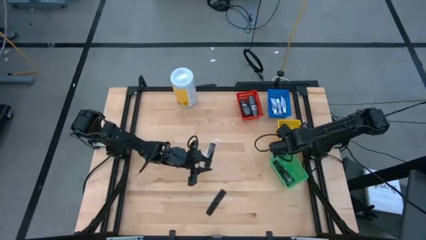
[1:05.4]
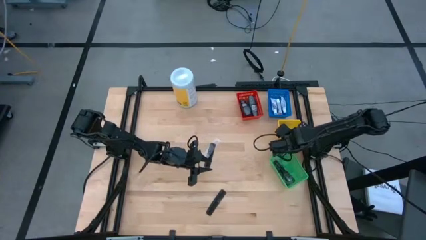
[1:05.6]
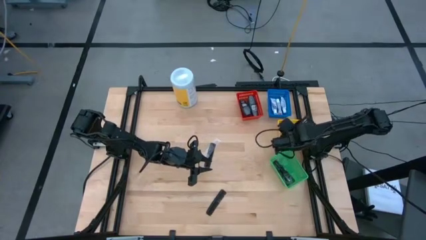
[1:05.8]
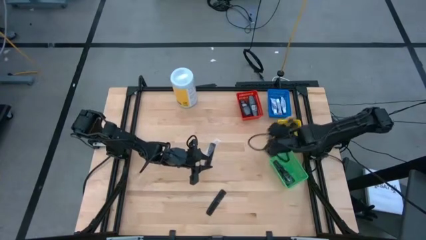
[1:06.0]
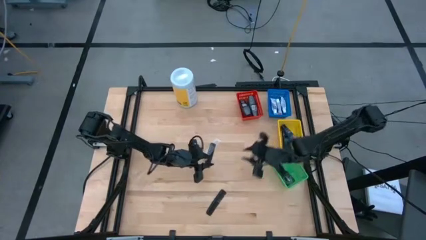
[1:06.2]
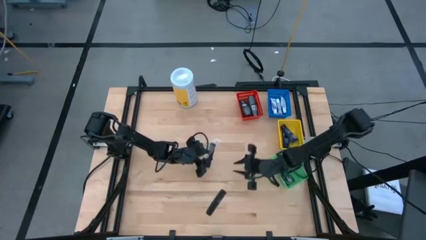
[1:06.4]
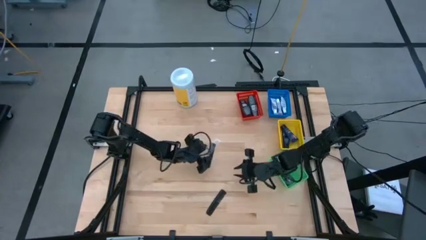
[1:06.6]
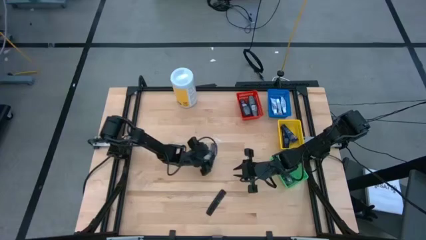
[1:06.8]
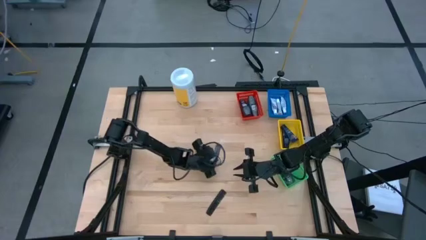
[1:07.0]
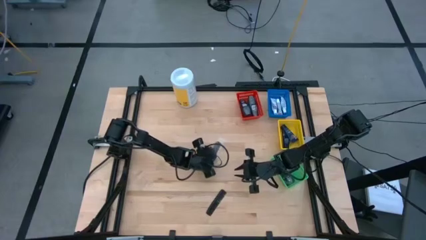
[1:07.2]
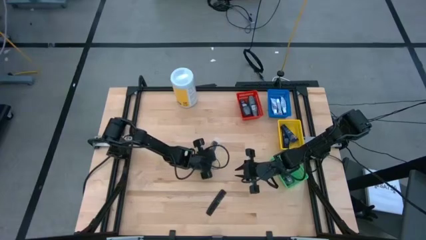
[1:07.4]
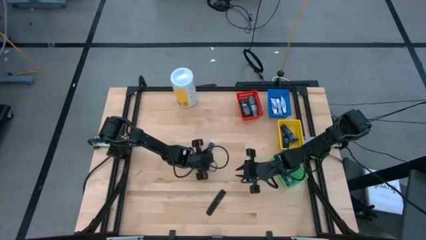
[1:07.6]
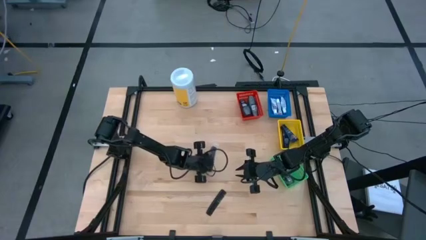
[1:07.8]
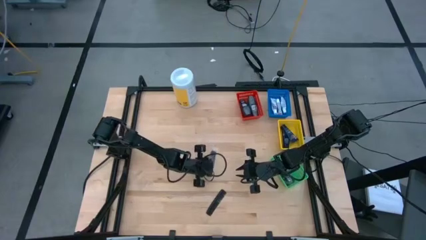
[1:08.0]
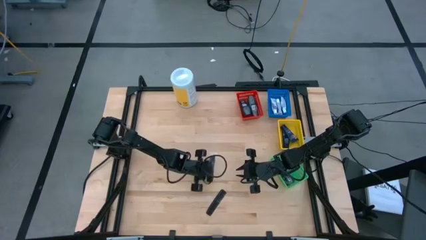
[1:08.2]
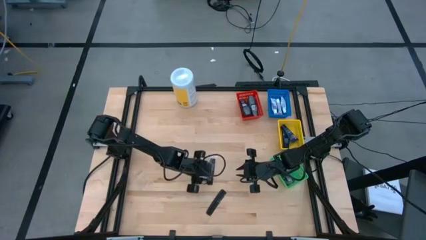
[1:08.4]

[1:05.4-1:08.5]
Task: Pick & Place Travel size toiletries
Put the black comb into the green bin

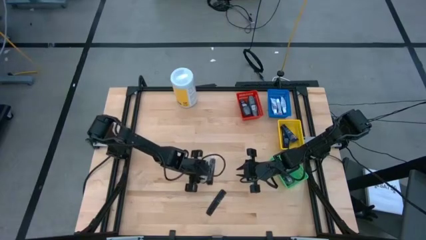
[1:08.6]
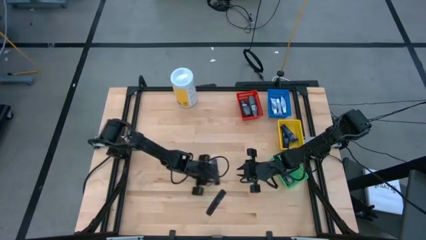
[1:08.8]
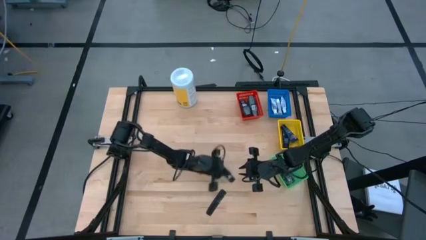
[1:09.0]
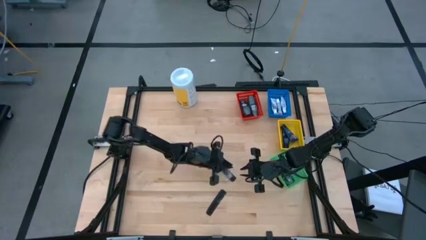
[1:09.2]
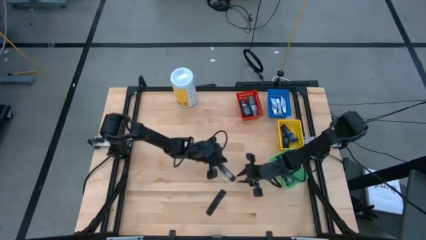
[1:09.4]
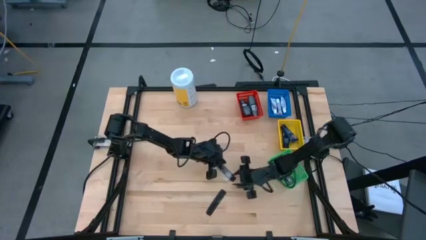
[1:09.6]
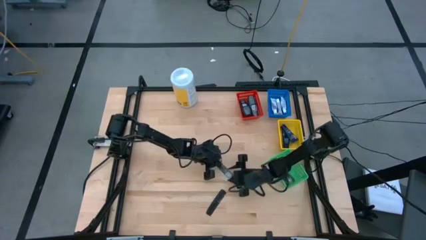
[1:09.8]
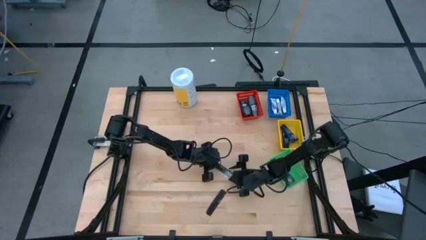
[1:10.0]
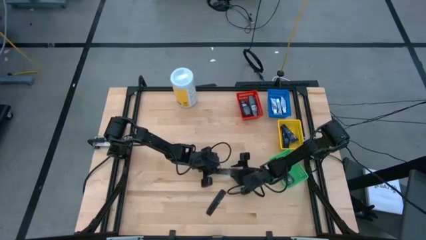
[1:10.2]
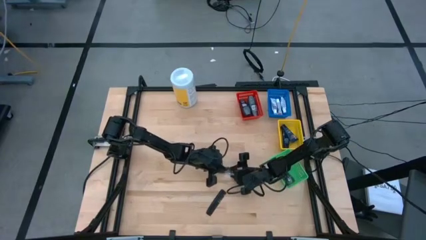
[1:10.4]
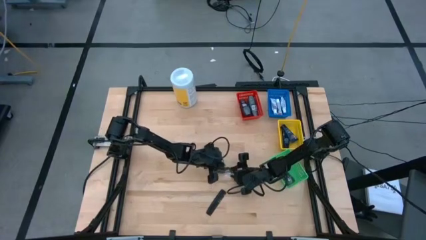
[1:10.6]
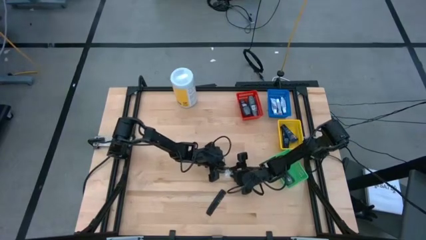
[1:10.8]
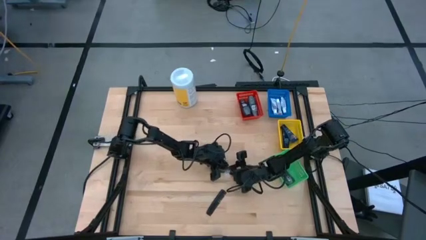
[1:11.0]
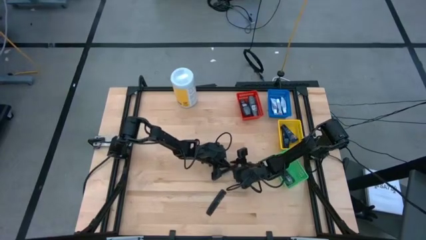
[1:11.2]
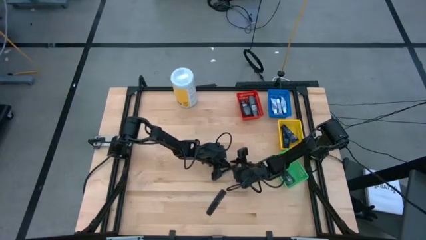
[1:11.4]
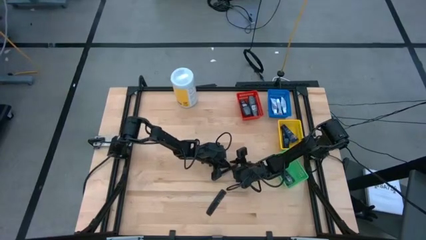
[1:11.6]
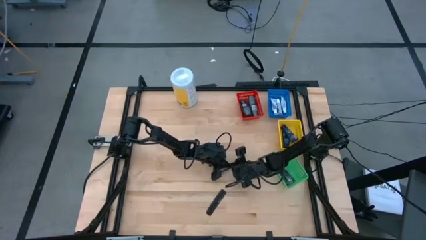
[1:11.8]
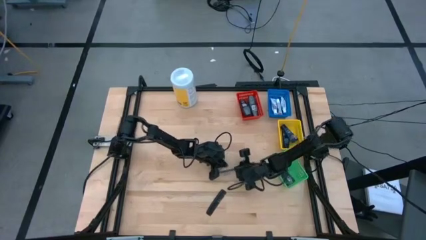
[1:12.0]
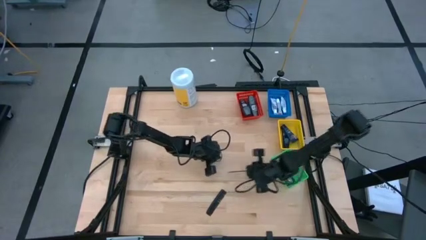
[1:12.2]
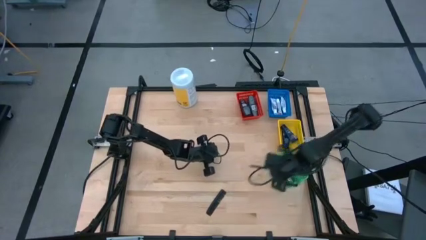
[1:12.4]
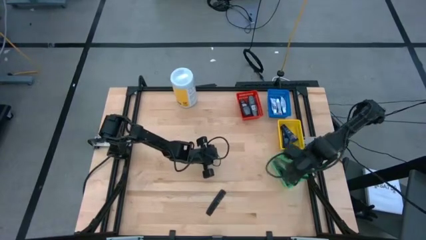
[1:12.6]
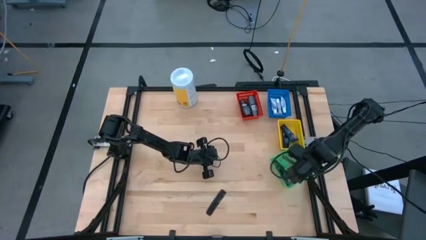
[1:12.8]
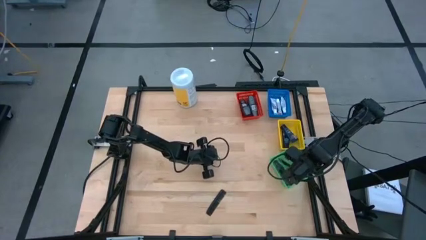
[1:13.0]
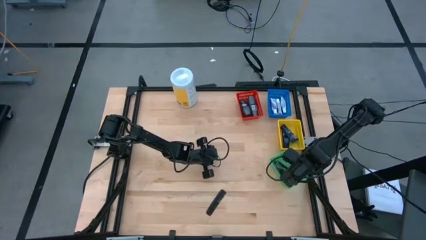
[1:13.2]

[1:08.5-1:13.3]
Put the black comb into the green bin

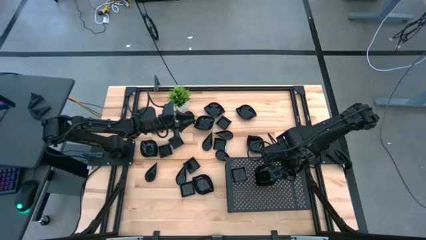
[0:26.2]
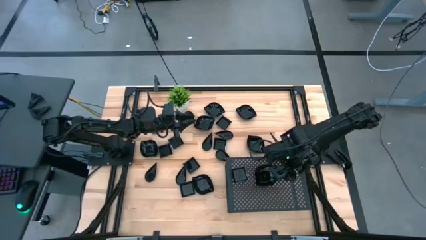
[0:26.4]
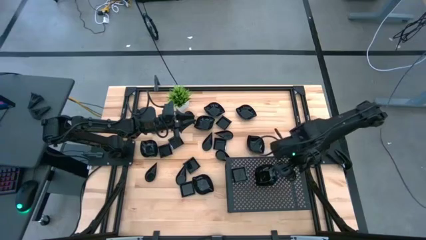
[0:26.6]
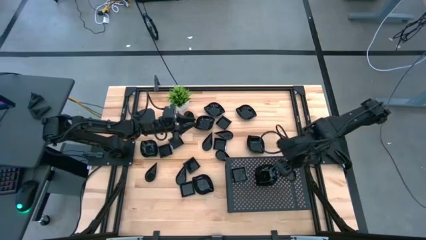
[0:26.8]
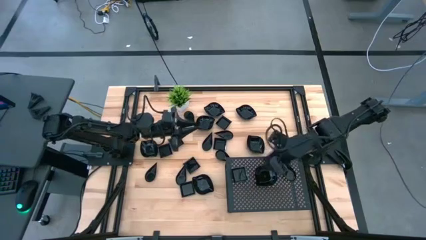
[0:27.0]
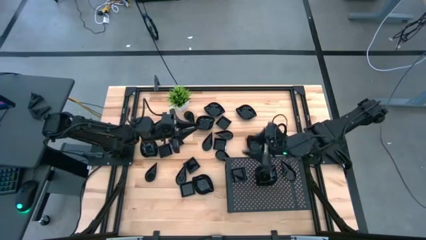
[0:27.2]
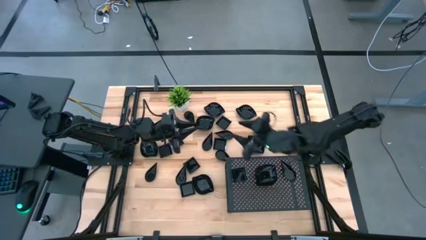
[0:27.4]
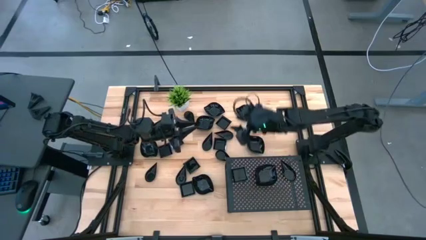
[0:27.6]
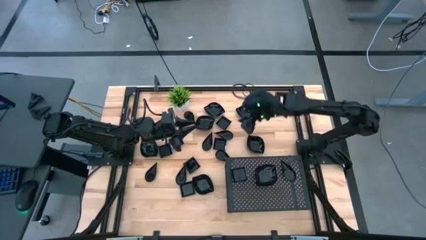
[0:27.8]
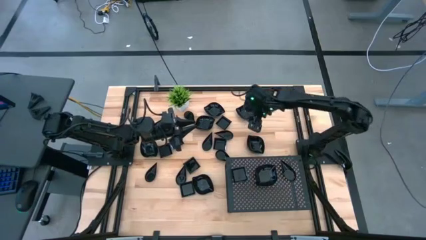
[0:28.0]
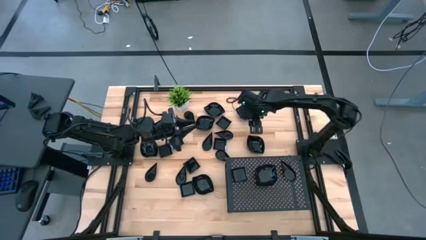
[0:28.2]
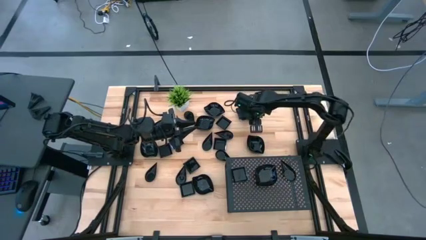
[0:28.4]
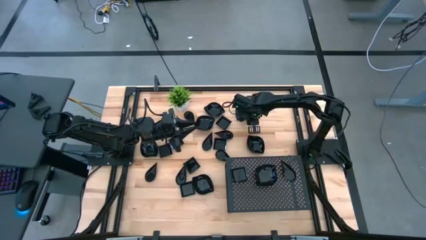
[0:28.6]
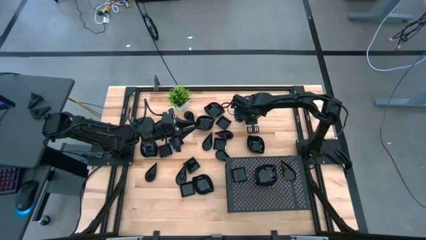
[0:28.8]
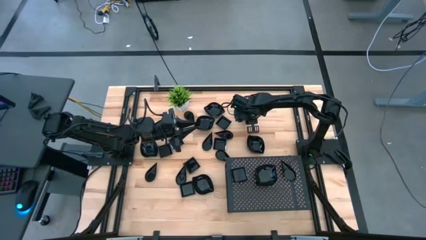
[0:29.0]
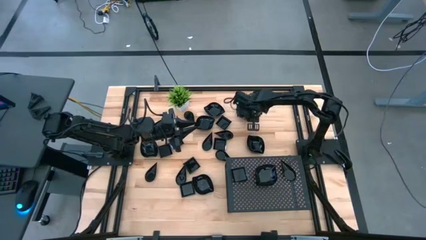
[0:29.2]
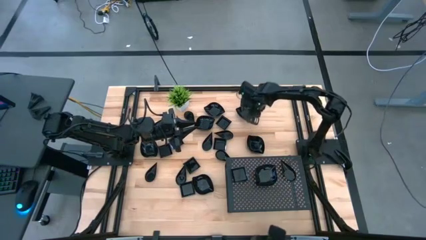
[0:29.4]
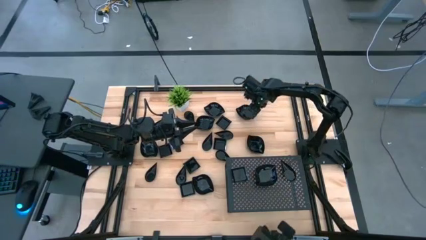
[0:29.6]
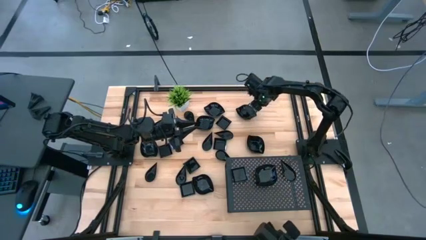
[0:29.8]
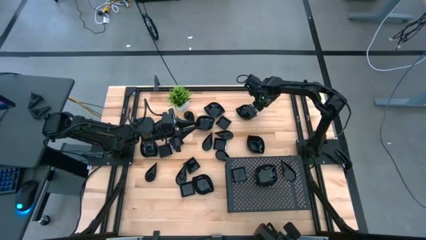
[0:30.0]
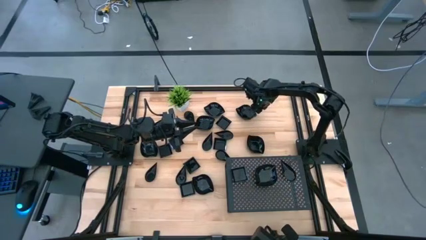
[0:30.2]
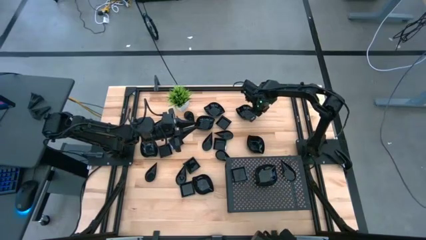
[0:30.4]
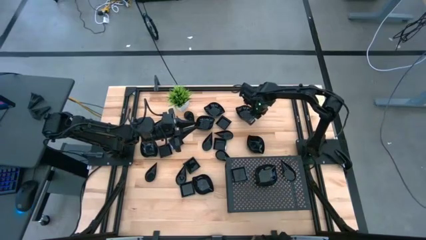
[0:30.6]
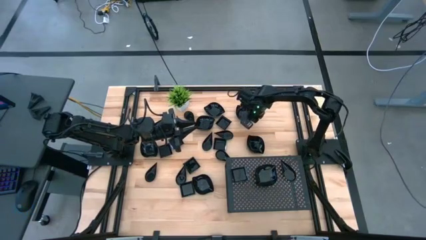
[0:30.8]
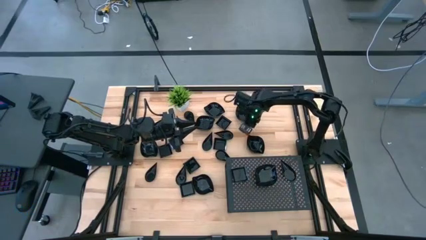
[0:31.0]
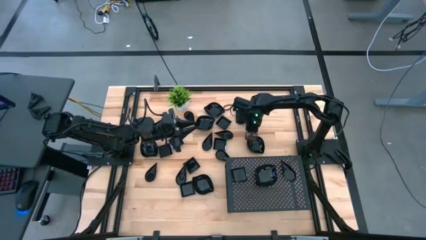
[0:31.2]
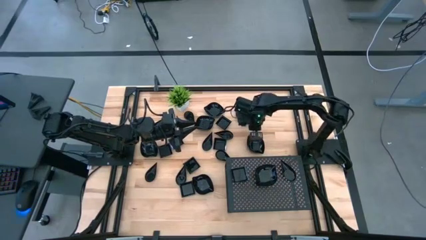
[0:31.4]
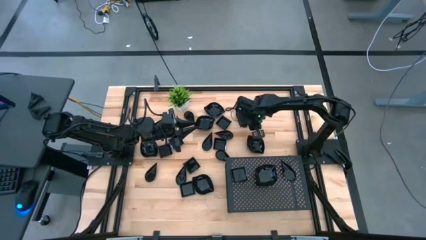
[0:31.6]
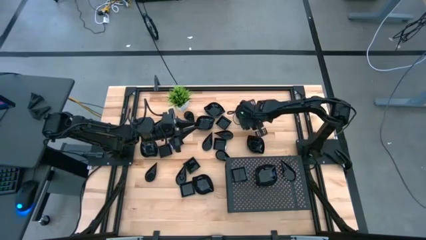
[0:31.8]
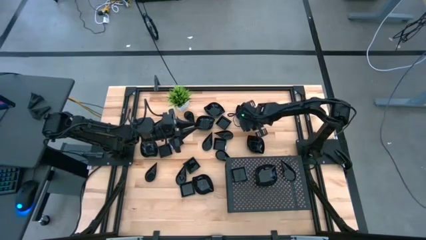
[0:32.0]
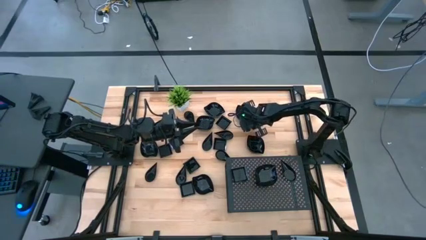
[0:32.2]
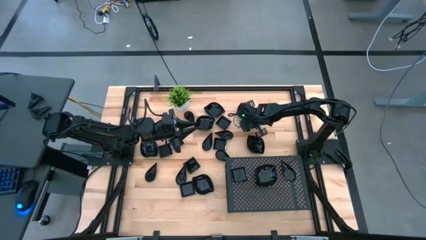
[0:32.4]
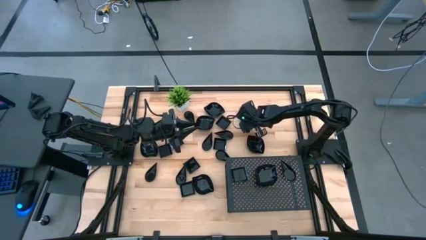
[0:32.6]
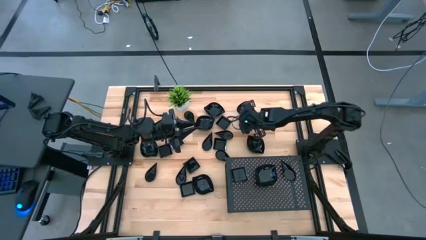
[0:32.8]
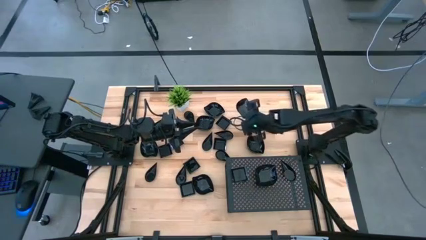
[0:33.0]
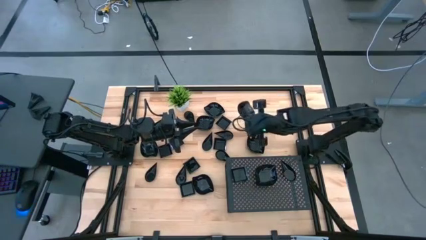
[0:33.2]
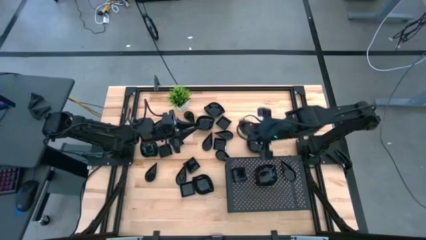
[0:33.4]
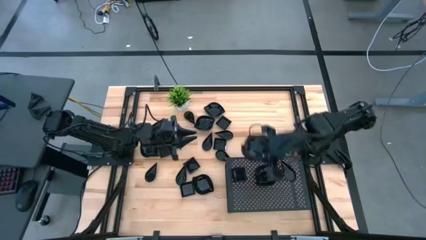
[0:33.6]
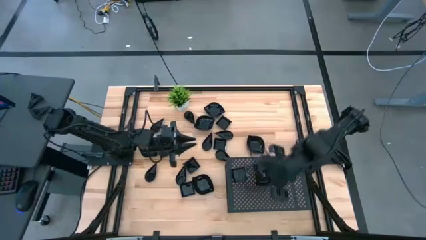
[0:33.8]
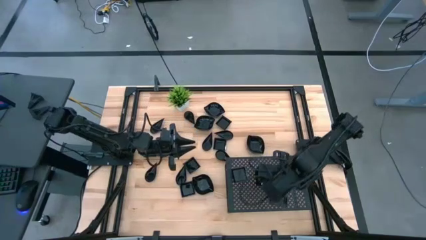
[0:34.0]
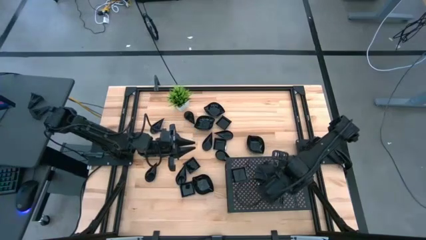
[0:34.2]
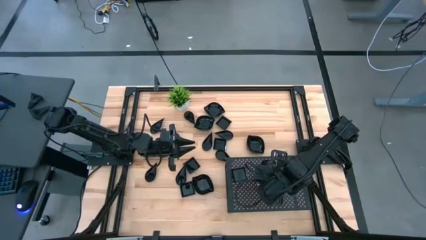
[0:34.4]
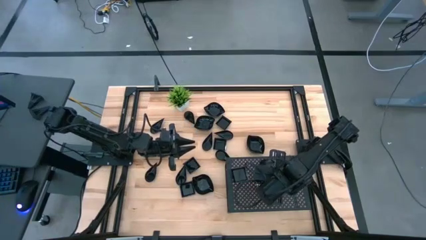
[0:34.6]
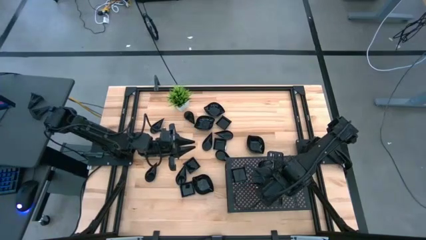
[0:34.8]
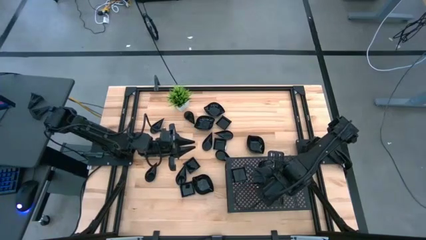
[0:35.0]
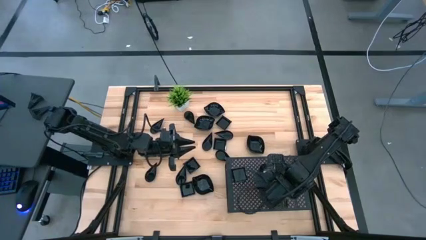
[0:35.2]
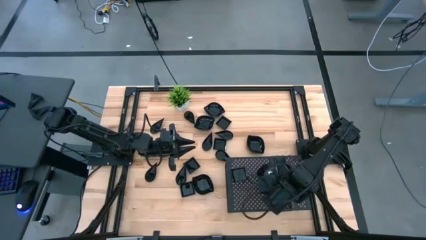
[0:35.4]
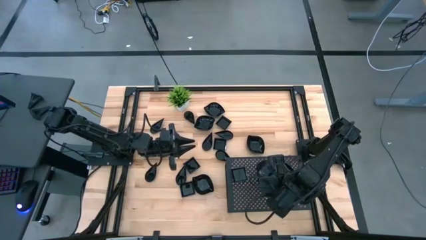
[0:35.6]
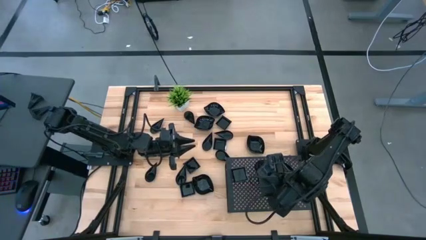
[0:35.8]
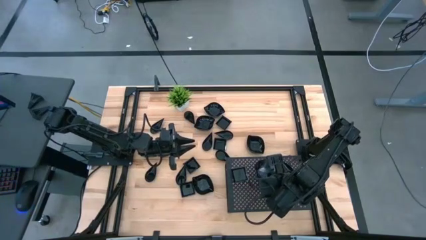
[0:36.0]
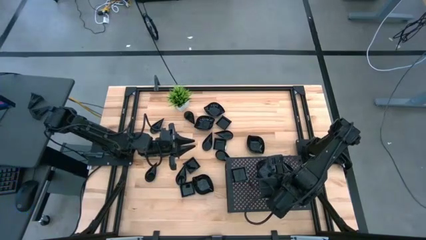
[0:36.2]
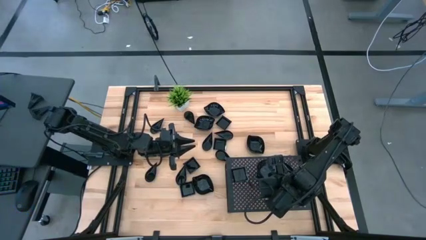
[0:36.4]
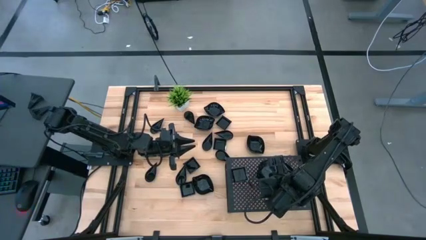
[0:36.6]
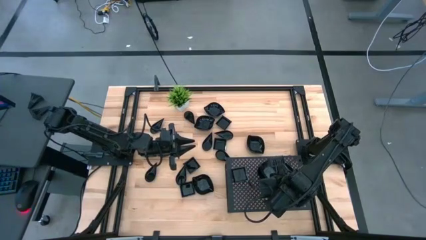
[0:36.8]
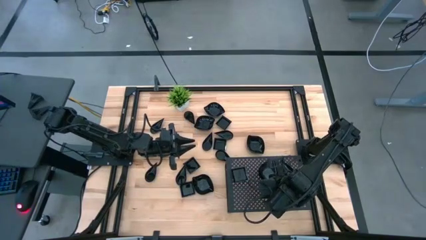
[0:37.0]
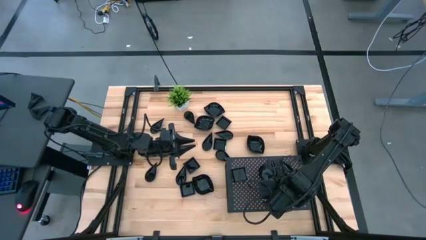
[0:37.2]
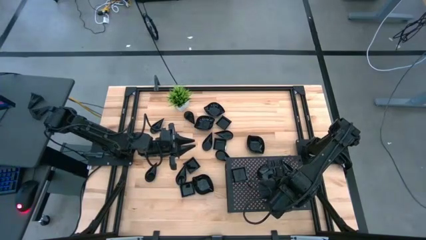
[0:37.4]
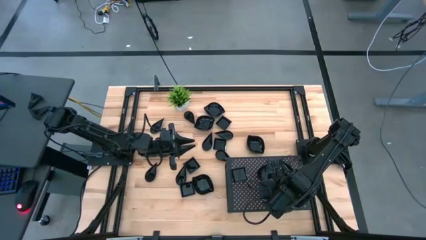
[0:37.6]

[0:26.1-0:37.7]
Task: Pick & Place Mini shaped plates
Stack the leaf shaped plate on top of the leaf shaped plate on the shelf
